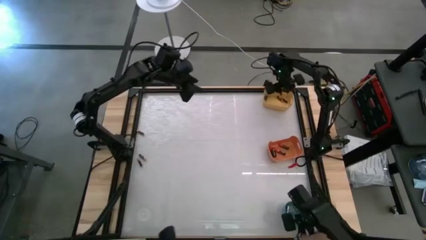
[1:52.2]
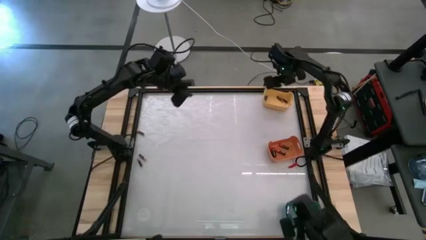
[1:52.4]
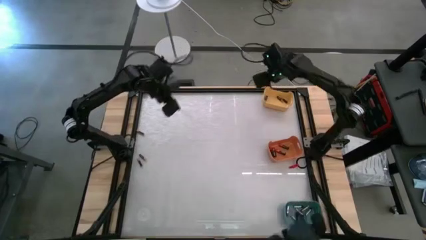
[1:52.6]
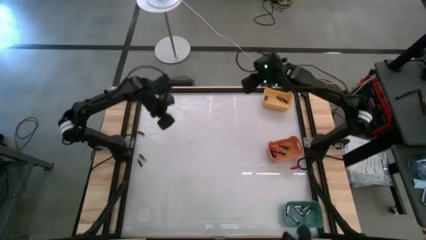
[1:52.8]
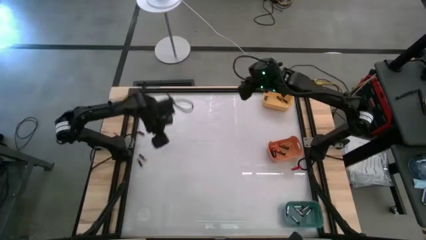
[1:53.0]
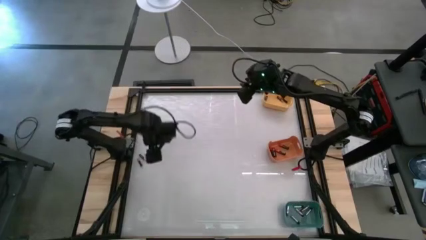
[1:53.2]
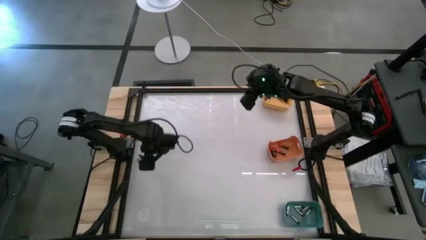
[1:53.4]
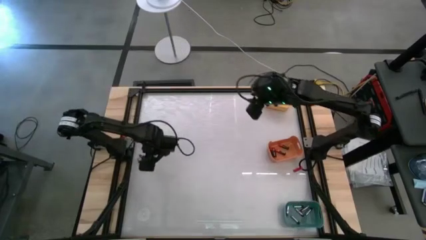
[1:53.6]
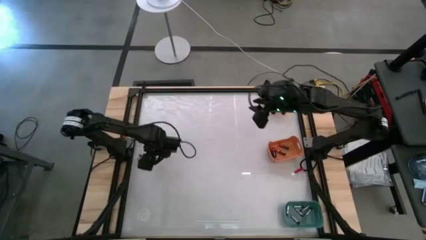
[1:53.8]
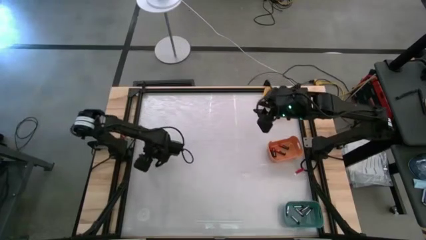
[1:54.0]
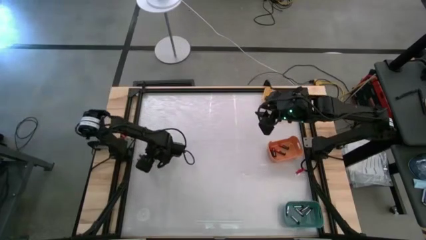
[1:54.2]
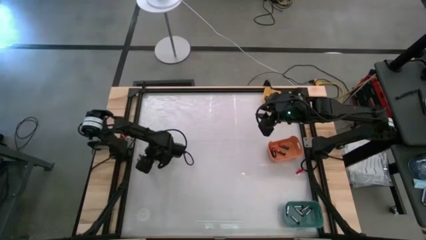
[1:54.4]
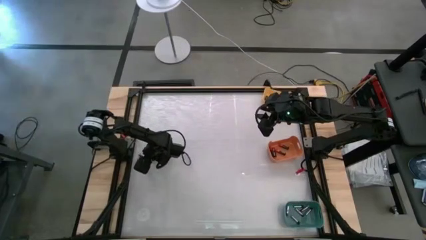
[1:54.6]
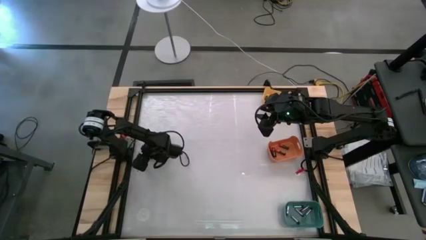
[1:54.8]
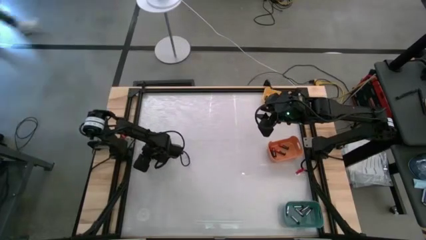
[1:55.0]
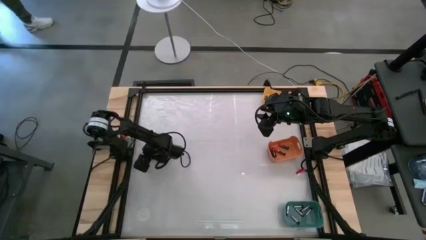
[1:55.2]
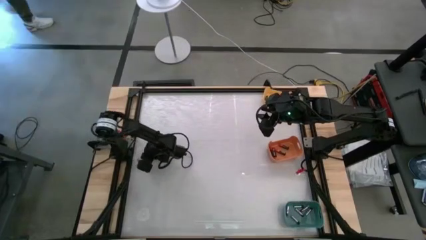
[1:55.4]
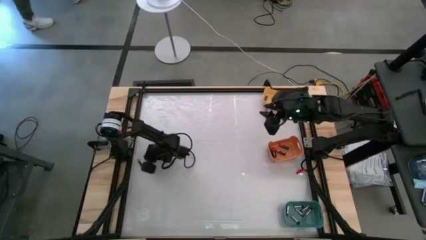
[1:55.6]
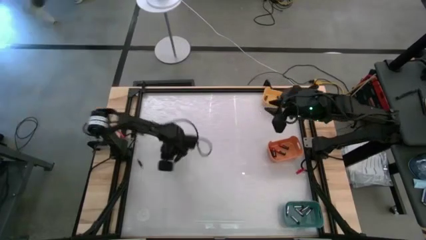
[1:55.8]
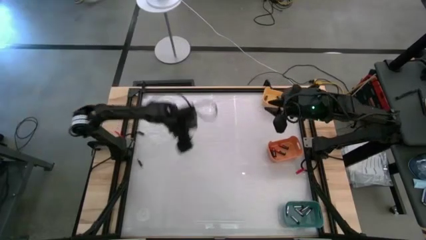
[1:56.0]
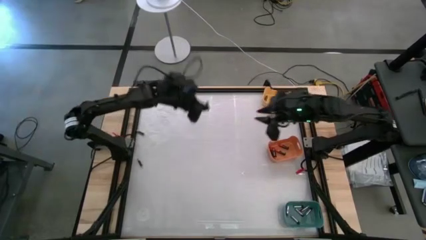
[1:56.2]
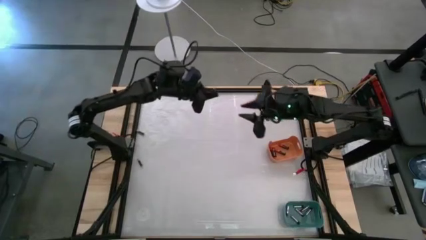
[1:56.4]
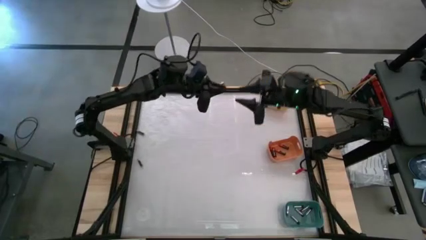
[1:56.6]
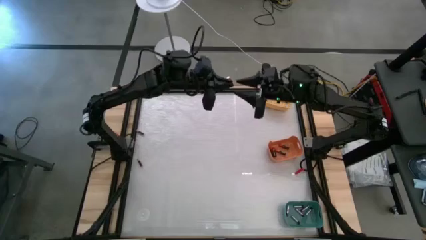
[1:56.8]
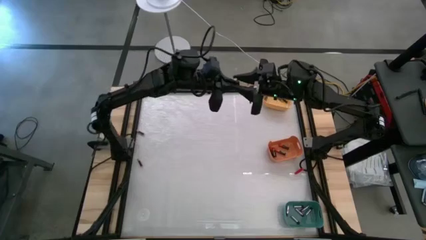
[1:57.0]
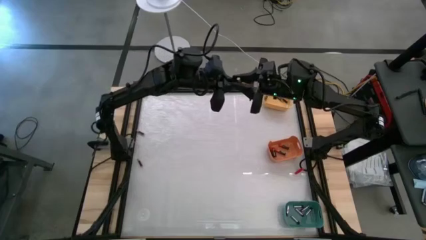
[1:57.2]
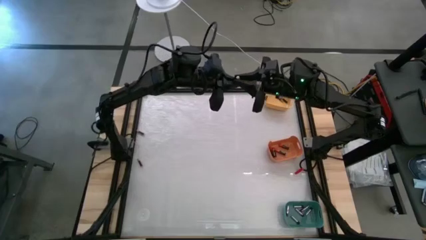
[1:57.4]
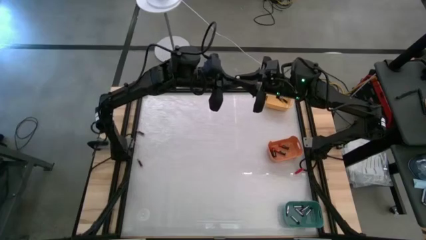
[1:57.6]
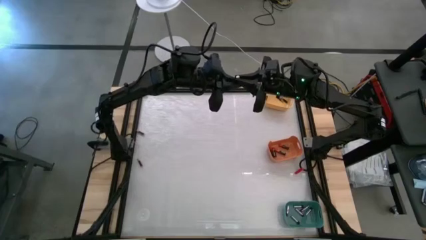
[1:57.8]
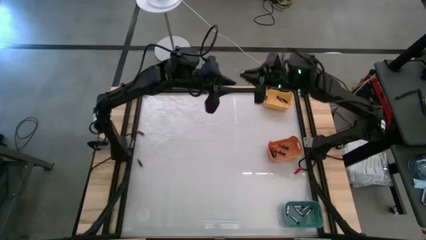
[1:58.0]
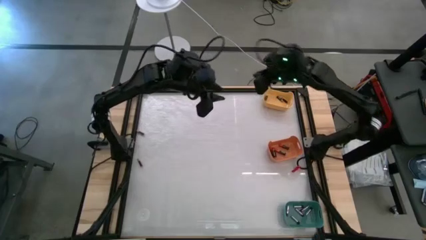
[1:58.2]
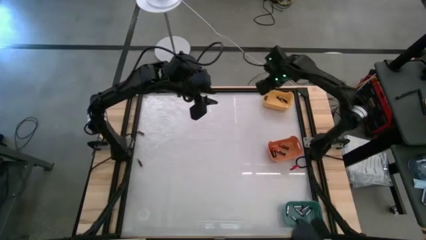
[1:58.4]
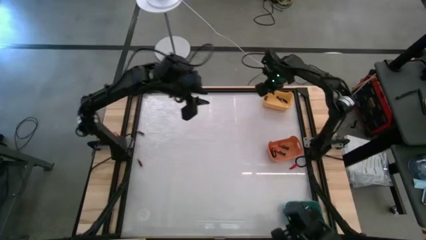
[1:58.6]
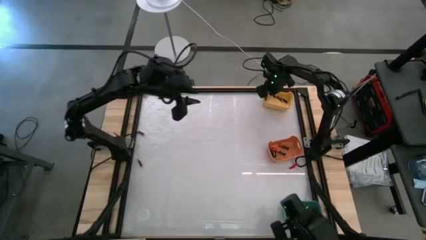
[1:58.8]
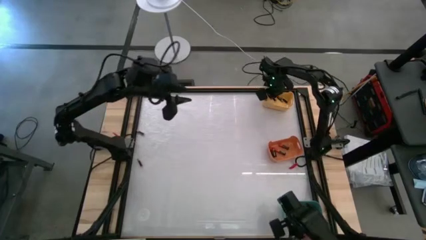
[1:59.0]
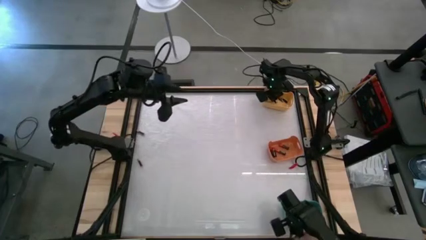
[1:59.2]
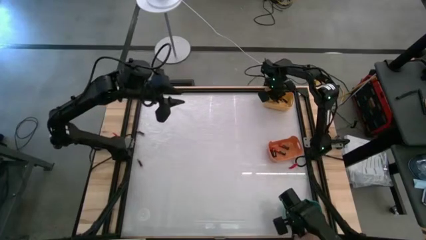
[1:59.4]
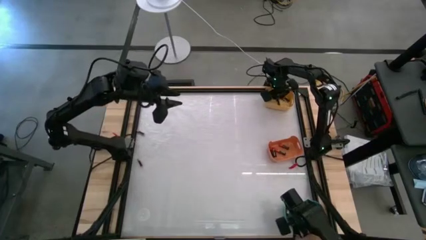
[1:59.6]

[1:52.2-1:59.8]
Task: Sort batteries
Put the black-orange battery into the yellow bin

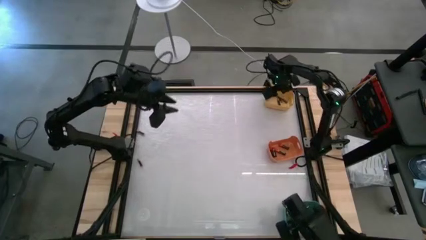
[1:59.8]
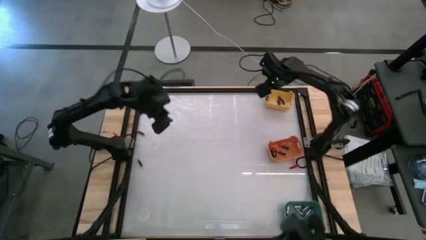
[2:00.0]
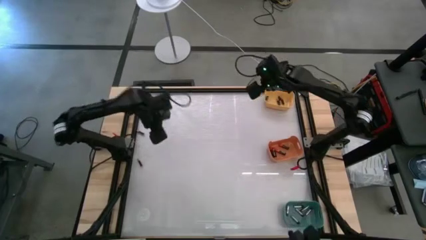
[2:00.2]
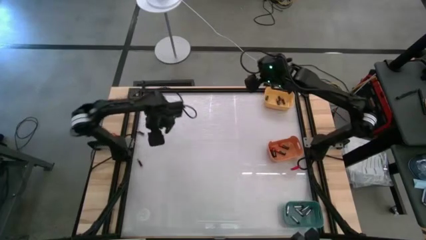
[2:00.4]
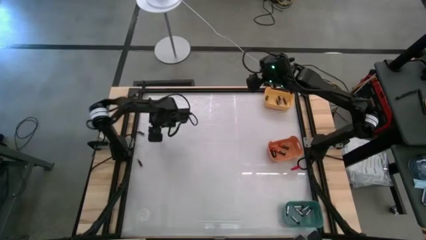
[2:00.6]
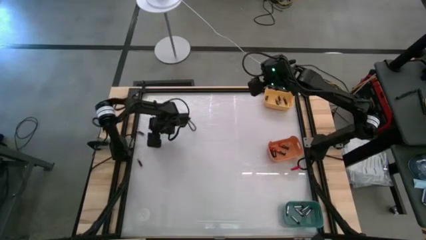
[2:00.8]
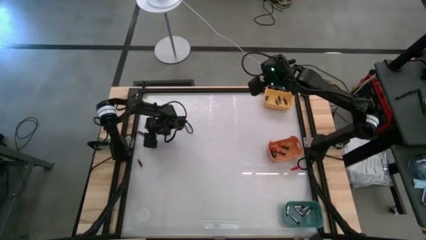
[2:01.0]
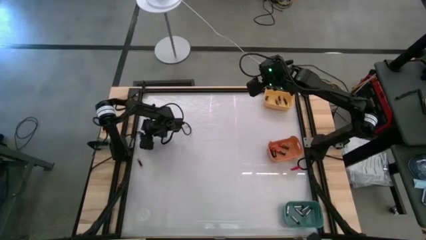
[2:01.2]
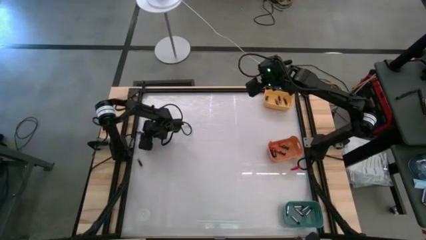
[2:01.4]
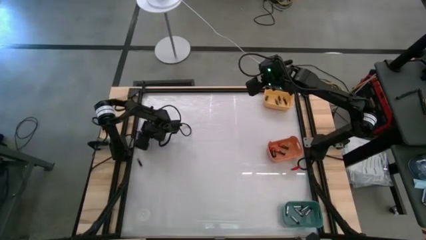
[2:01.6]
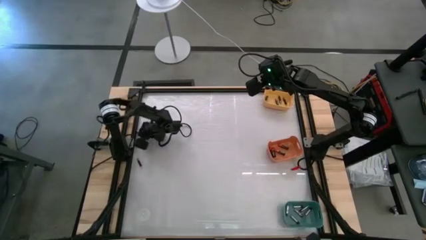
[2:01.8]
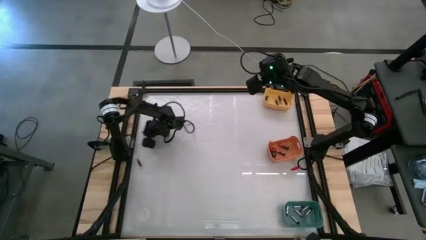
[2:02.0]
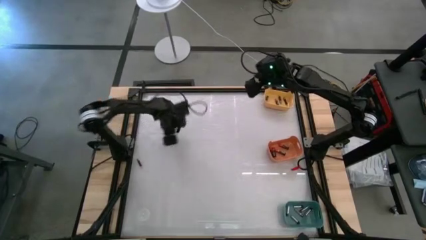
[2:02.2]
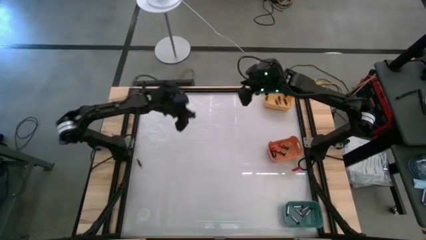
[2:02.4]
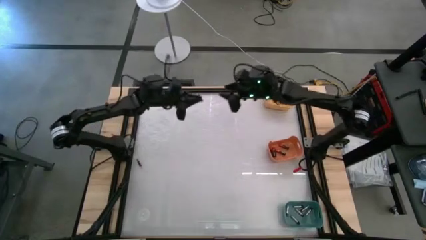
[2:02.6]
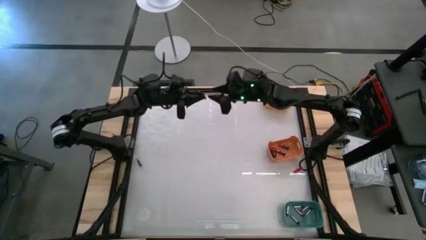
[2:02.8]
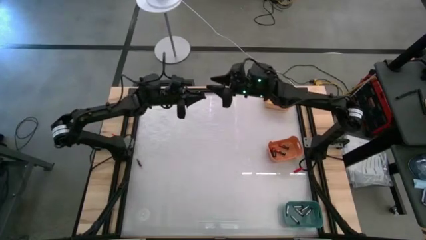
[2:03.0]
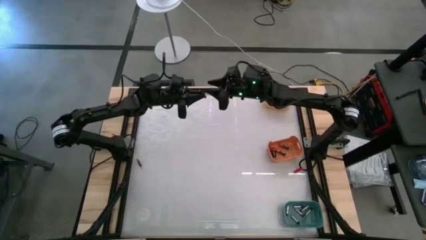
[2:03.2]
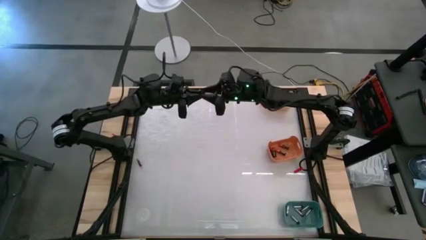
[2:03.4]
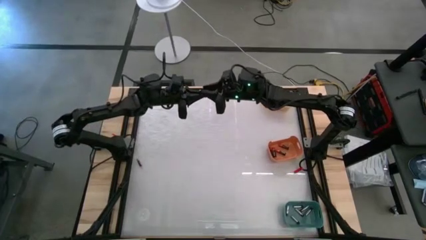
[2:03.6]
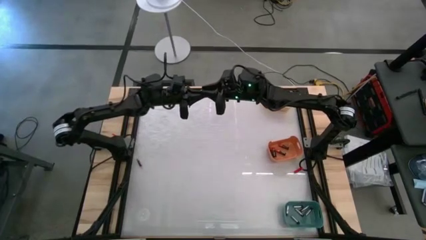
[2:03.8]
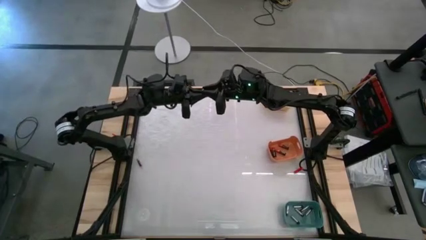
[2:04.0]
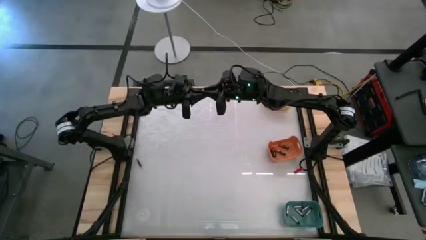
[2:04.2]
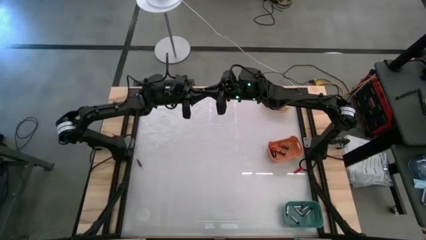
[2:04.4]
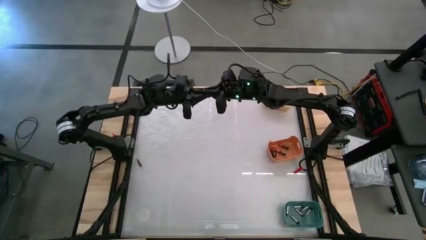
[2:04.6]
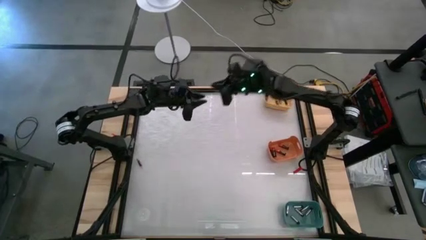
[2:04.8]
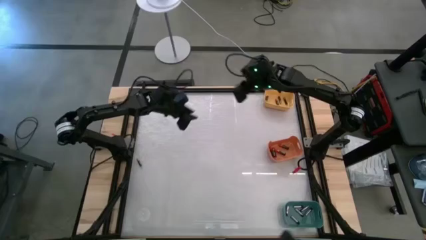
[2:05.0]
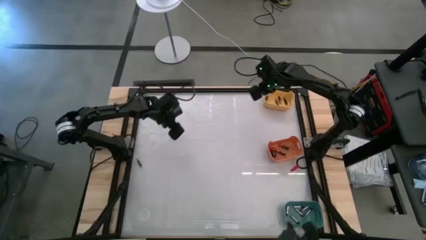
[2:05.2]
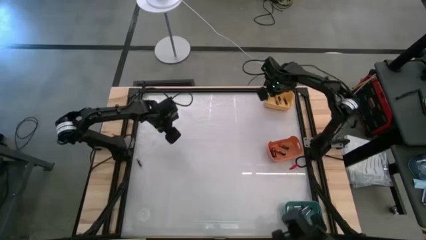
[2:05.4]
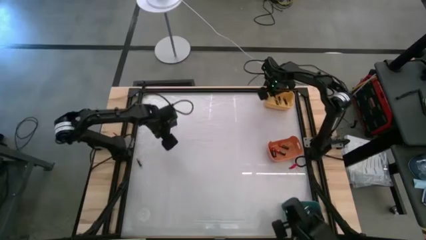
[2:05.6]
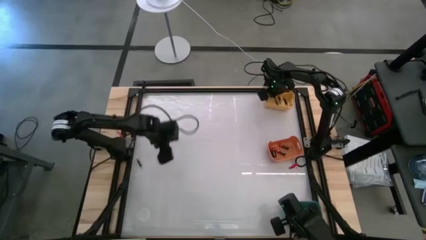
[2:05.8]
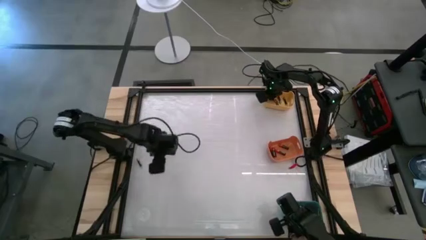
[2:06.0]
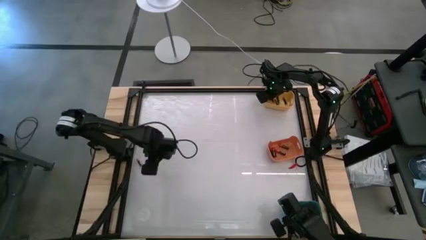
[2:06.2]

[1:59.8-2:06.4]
Put the black-orange battery into the yellow bin

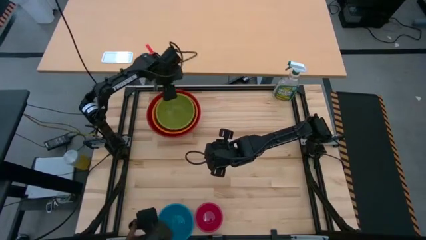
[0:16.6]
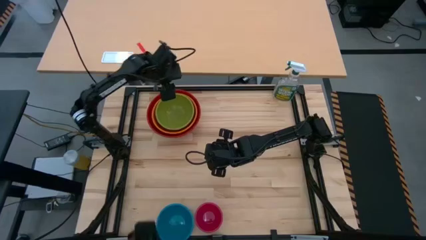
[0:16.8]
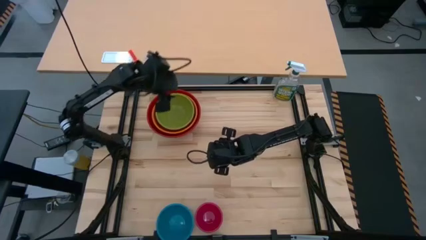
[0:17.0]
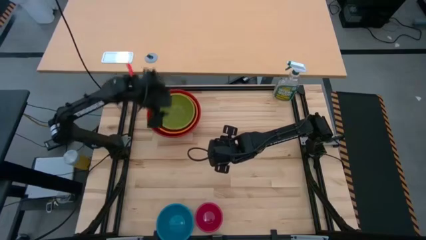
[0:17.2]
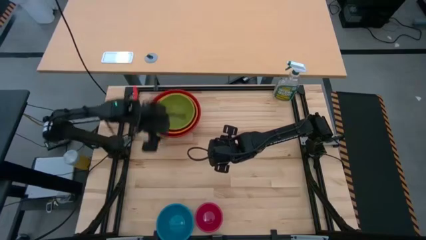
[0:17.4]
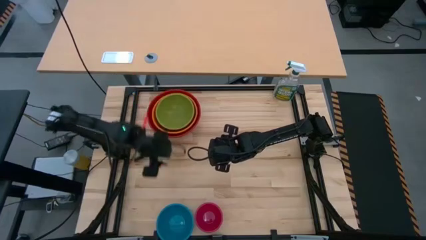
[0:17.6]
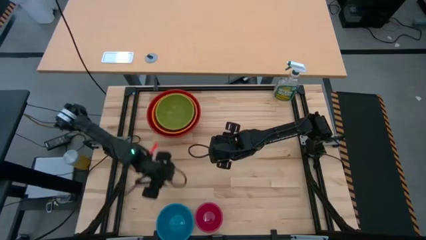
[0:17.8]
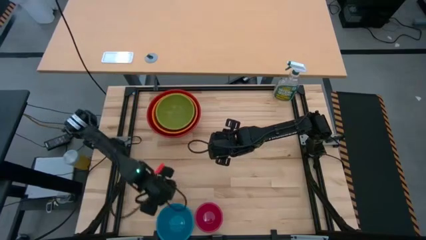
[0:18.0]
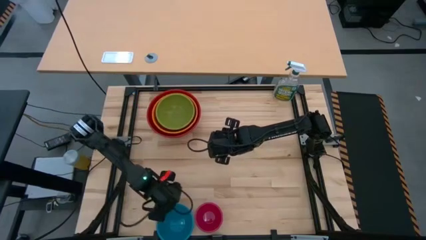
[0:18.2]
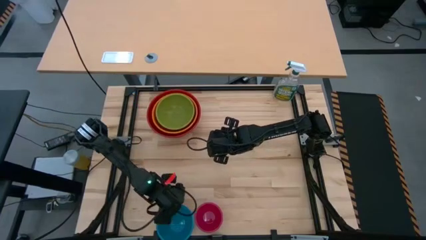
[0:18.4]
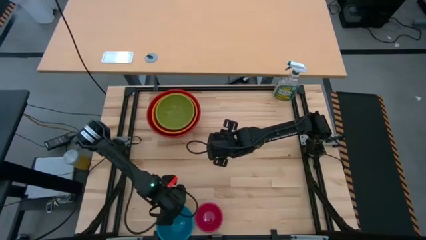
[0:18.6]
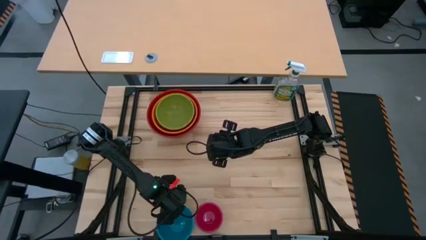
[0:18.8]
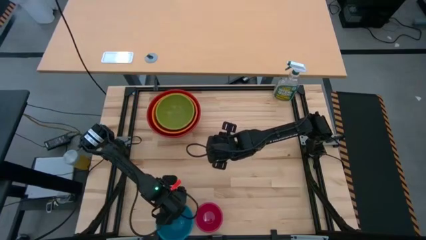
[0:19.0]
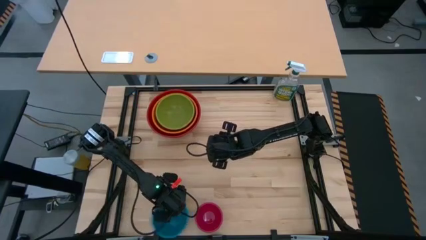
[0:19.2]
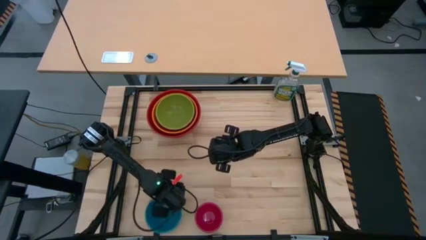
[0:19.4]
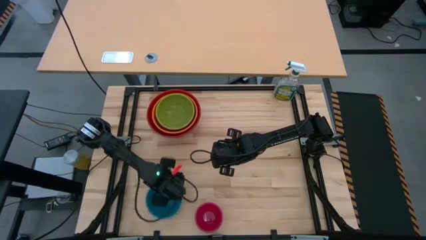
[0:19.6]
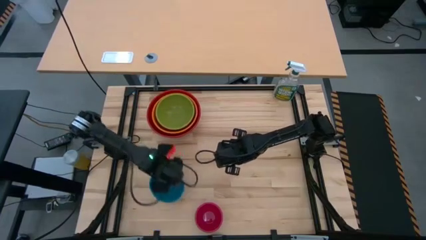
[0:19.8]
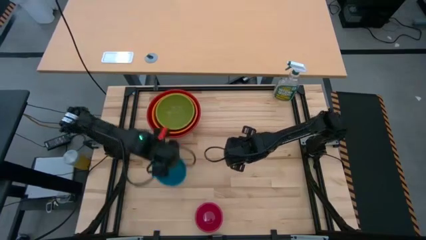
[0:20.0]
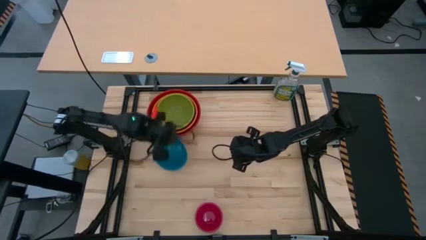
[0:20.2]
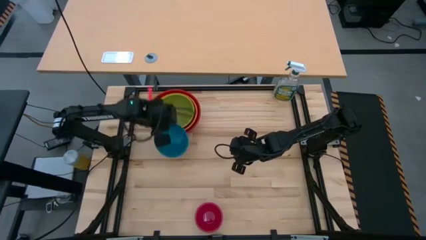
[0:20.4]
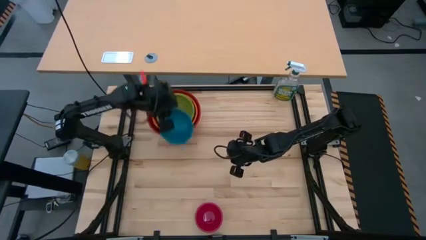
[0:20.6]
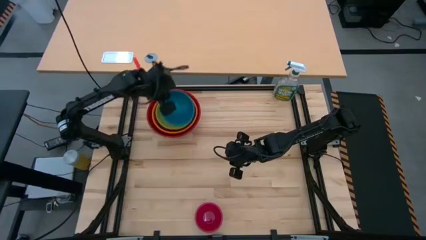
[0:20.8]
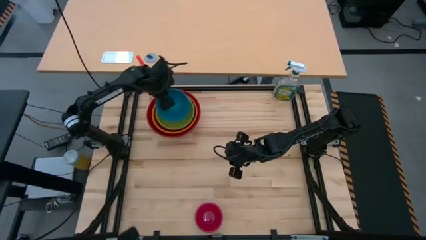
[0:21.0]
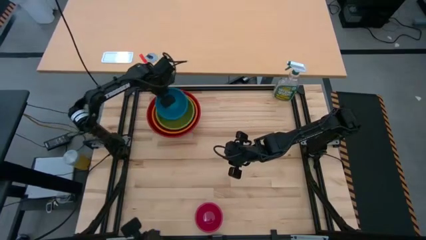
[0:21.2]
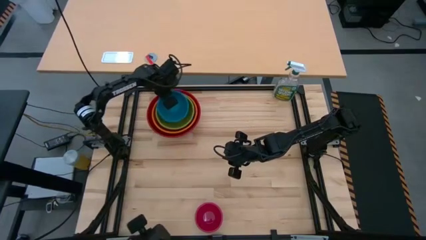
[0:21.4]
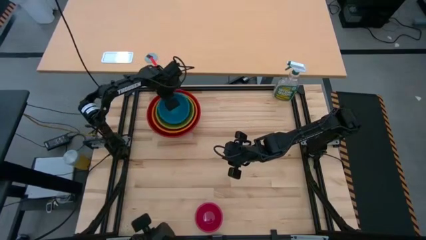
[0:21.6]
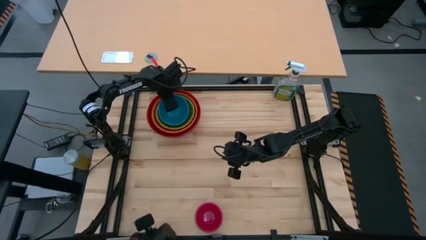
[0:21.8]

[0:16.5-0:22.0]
Task: Nest bowls inside each other by size order
Stack the blue bowl on top of the green bowl
